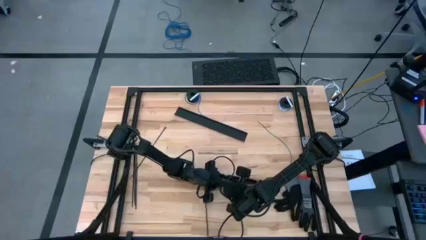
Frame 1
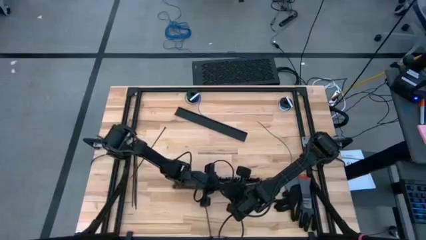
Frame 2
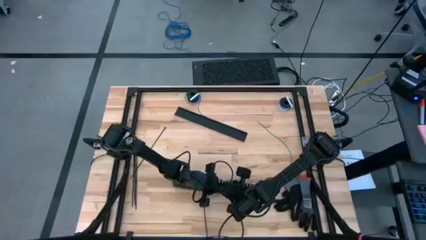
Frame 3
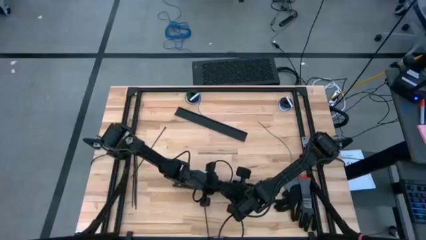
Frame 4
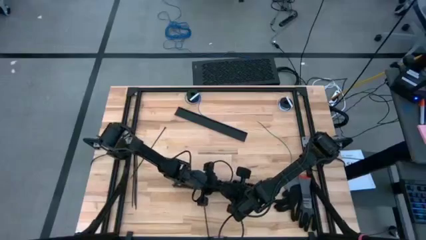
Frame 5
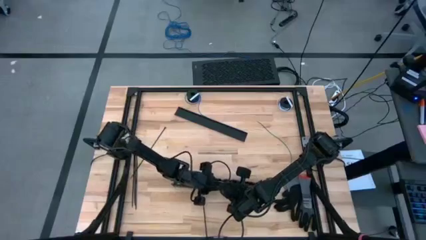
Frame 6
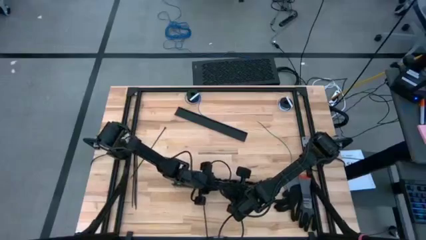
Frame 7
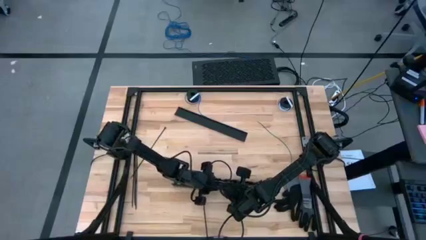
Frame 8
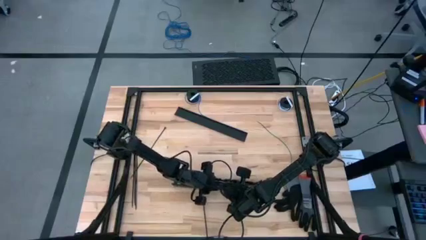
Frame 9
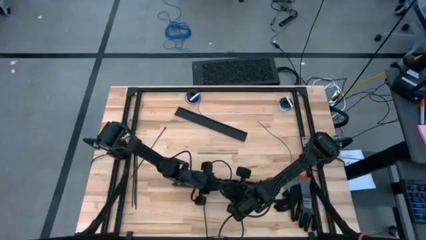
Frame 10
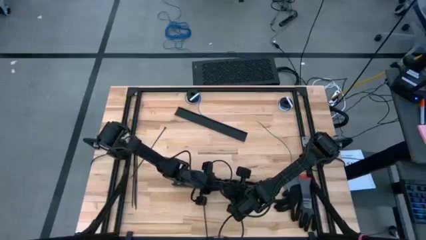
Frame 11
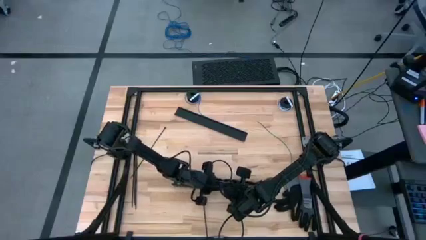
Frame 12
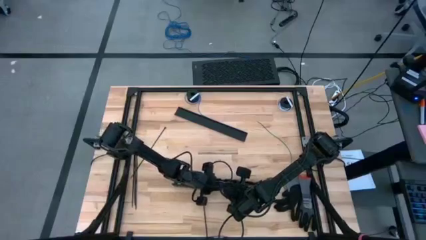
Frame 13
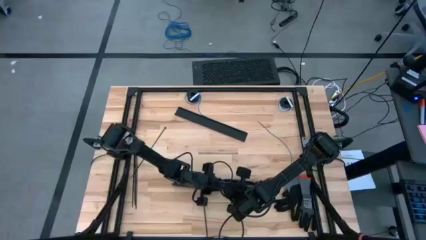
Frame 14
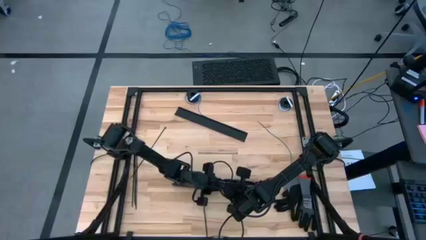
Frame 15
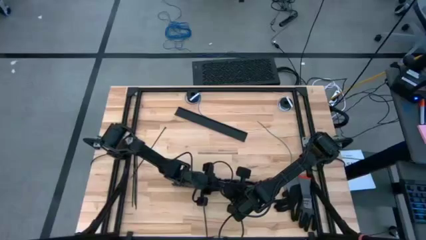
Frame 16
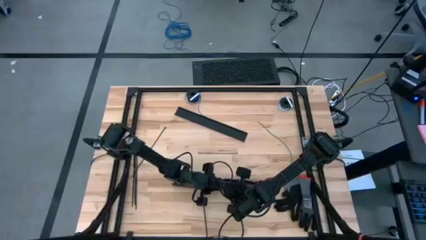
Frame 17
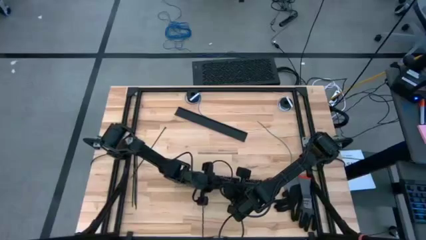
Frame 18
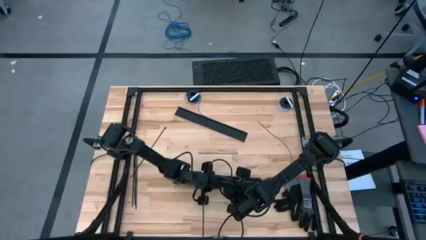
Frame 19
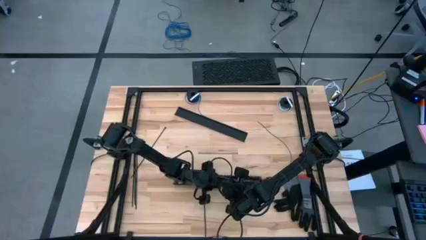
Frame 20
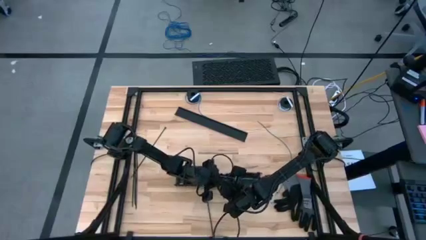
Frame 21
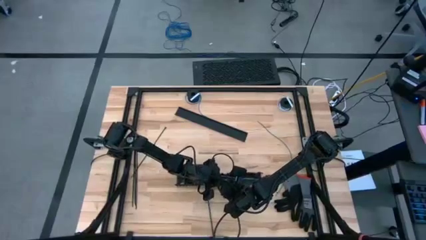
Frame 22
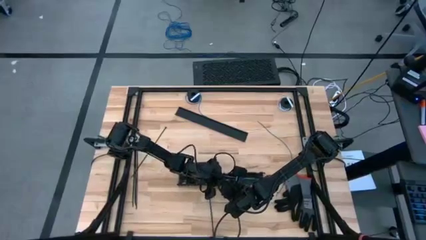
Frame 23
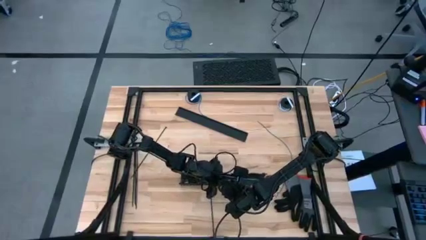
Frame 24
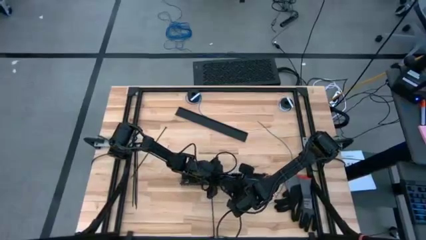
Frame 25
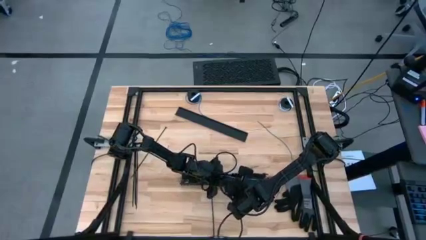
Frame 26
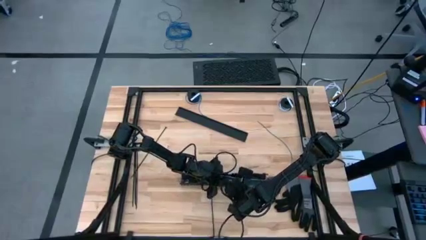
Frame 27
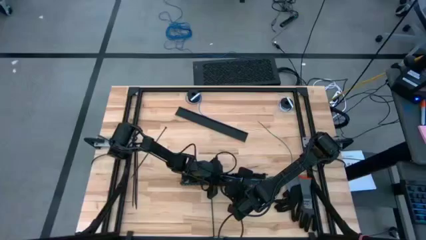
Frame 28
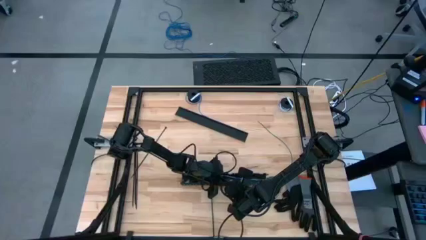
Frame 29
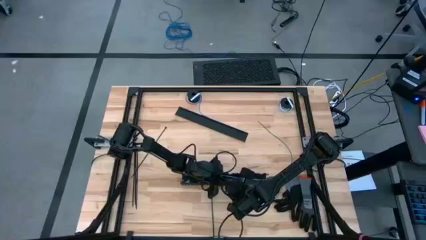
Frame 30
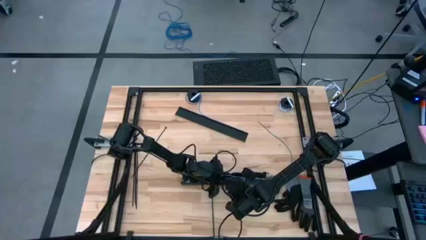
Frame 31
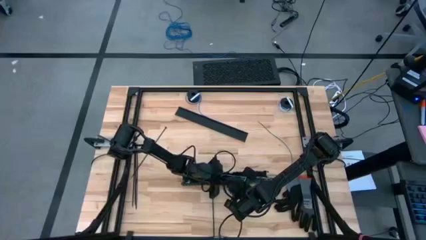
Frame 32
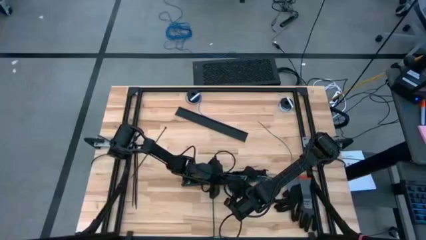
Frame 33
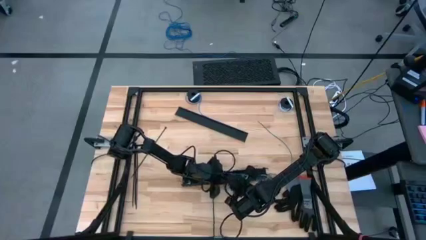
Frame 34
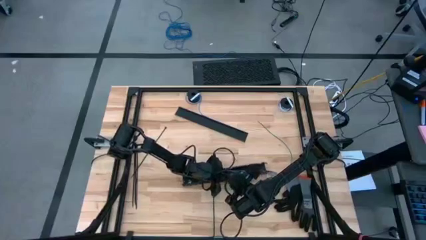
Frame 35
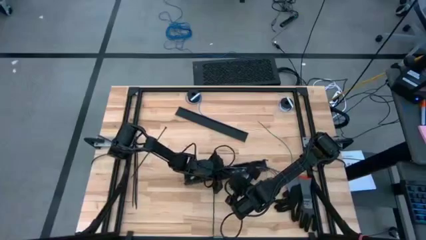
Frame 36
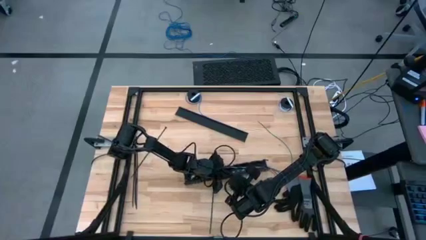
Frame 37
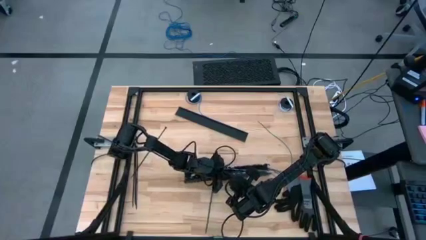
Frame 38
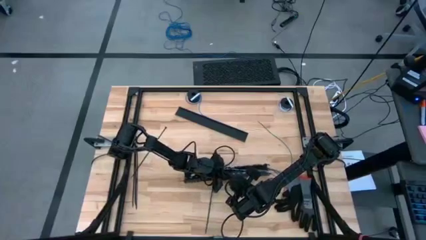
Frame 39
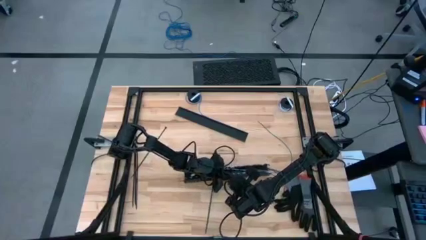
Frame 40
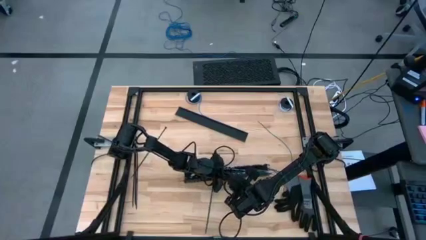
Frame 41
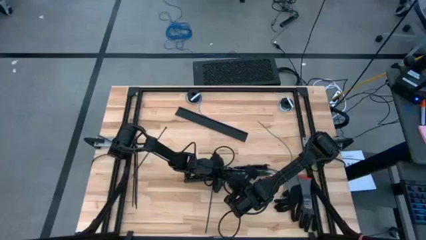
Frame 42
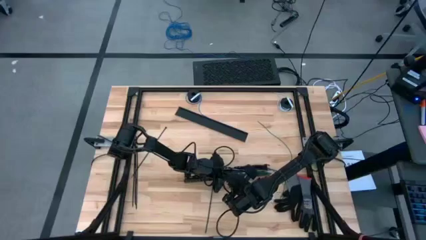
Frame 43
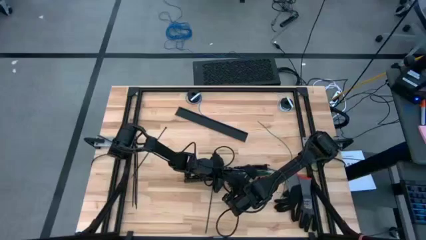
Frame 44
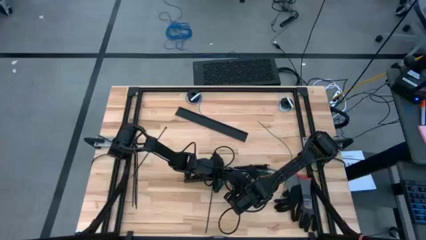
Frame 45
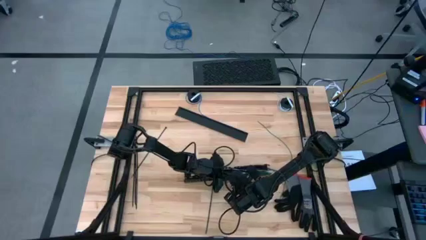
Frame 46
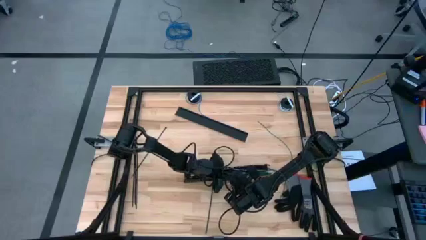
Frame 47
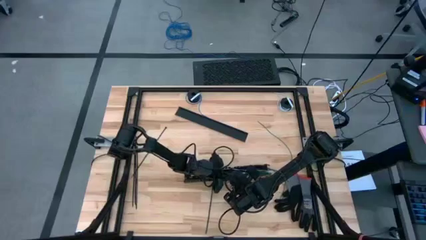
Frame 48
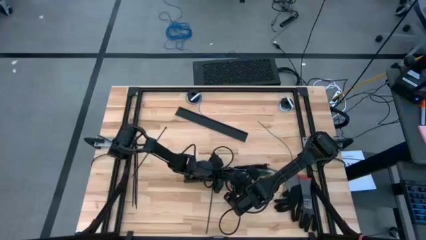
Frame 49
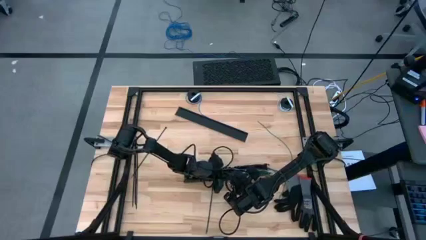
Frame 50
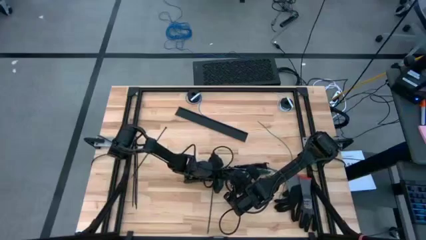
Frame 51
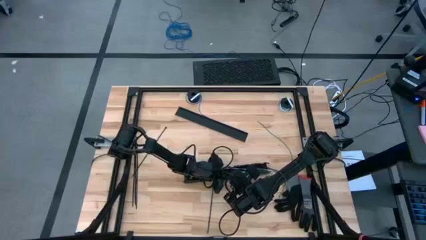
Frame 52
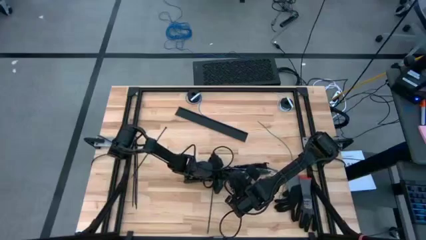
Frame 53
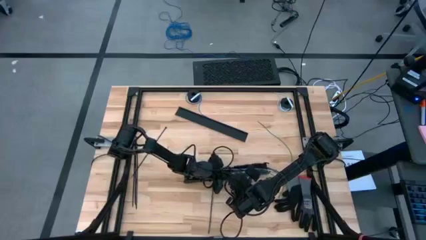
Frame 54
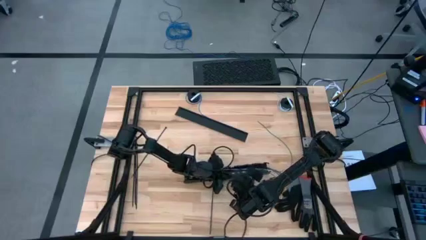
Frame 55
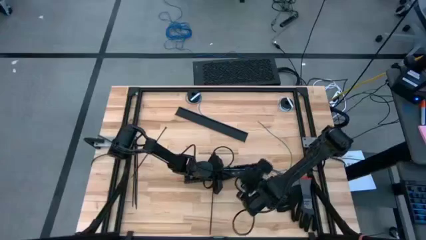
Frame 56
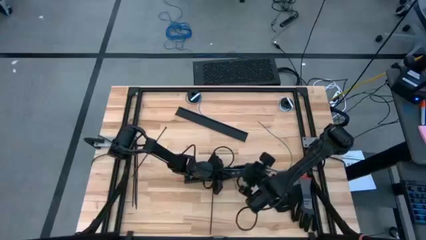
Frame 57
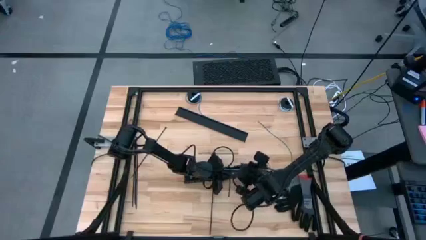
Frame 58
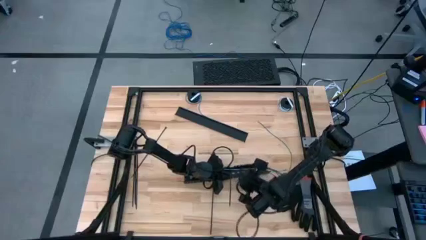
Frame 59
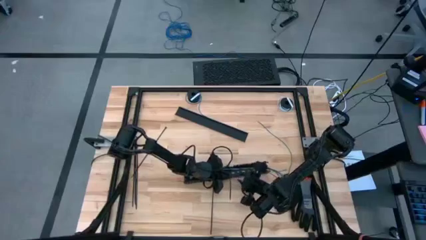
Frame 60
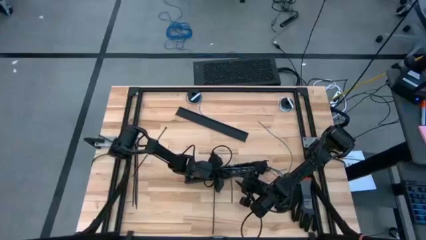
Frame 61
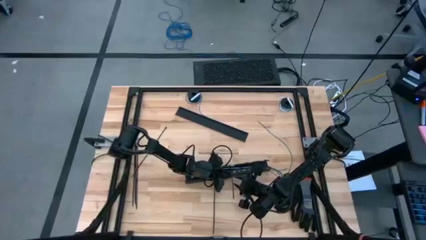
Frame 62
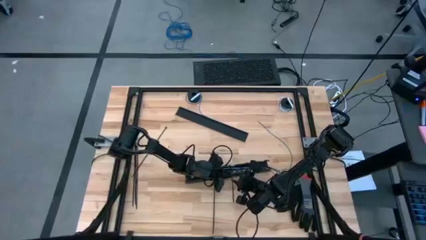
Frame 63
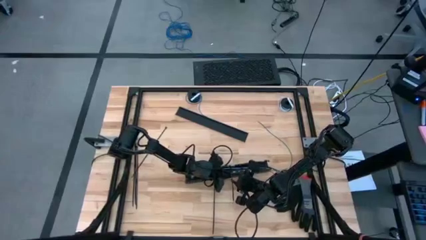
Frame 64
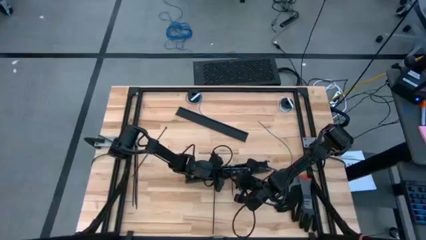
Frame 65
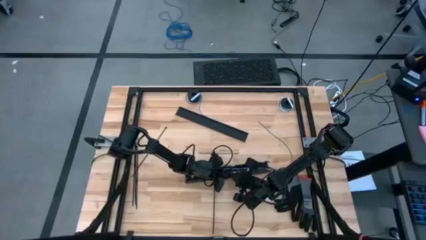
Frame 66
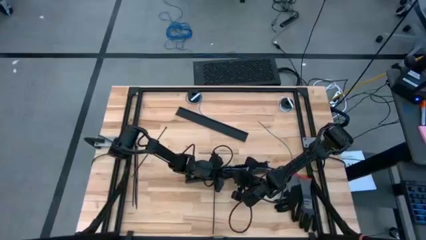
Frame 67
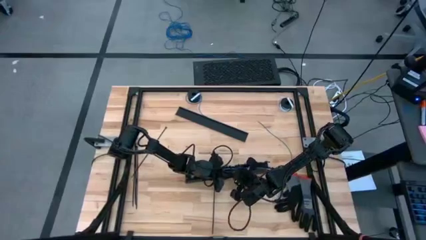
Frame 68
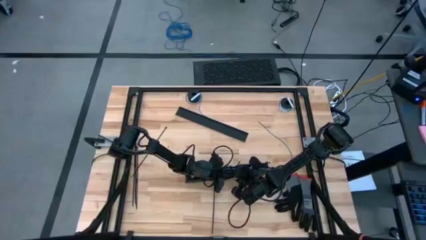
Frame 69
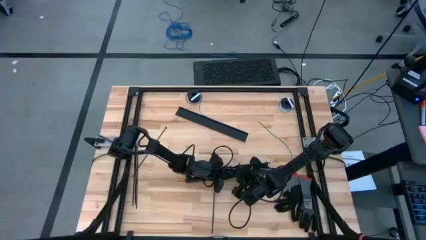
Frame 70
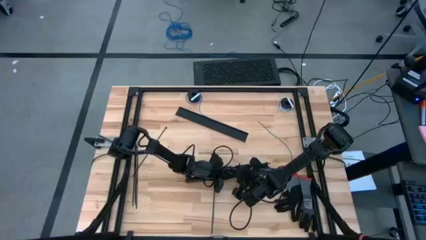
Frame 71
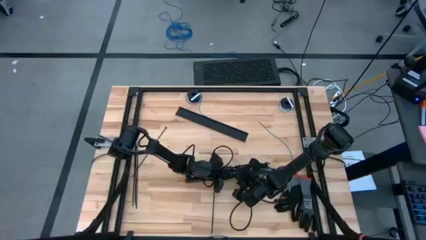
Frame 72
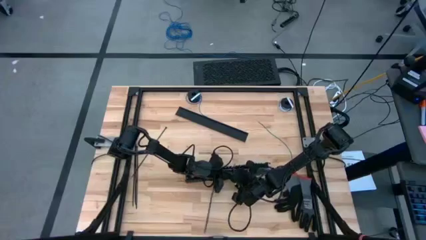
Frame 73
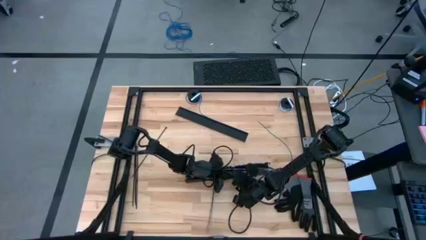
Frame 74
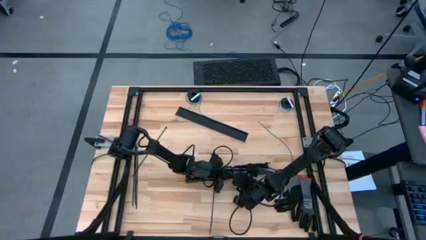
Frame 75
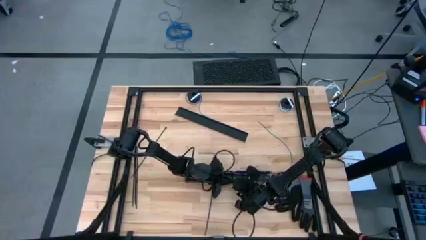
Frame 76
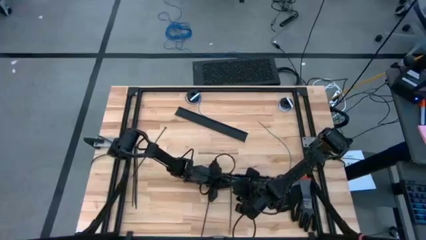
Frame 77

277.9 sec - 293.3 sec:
Task: Ziptie cables
Put the zip tied cable wire into the black cable duct
